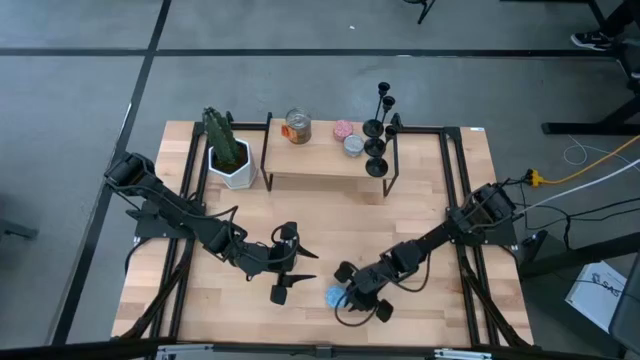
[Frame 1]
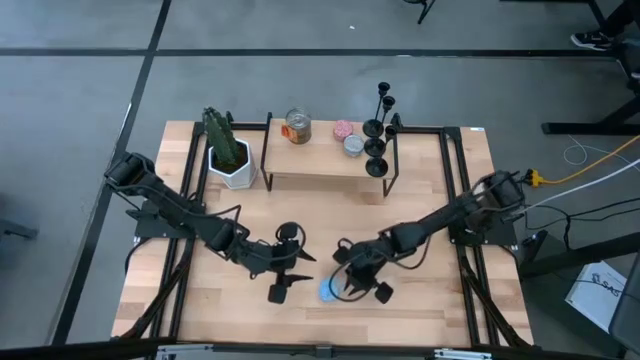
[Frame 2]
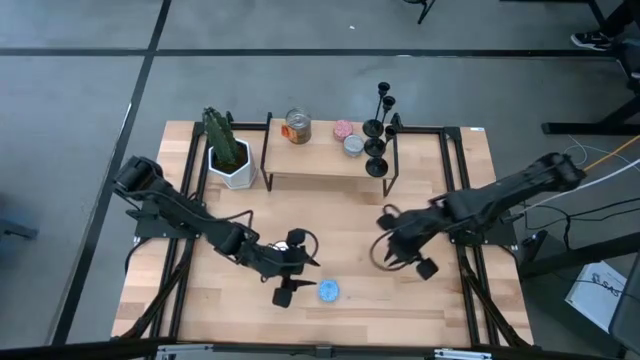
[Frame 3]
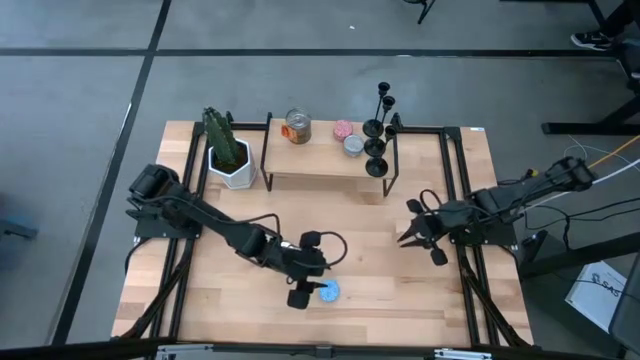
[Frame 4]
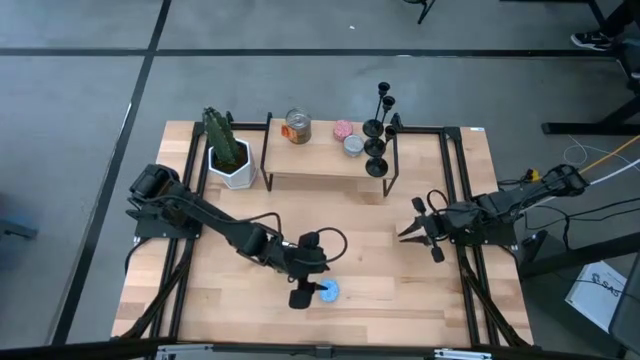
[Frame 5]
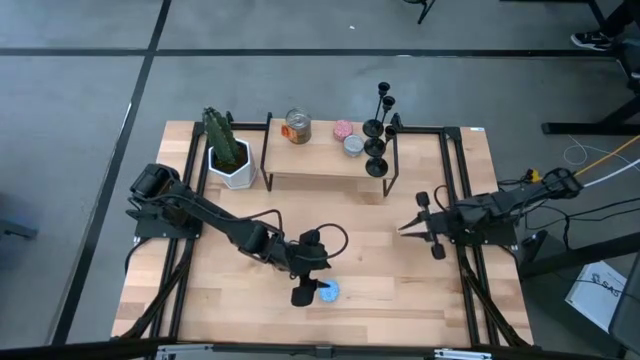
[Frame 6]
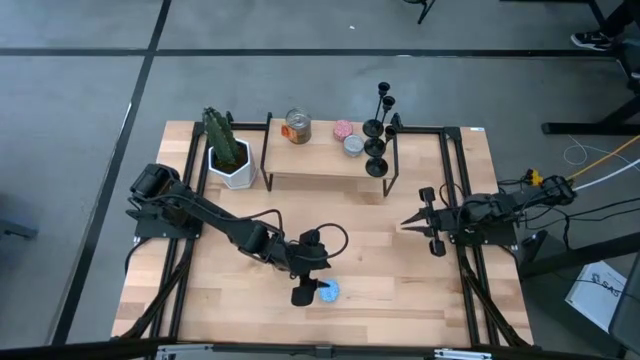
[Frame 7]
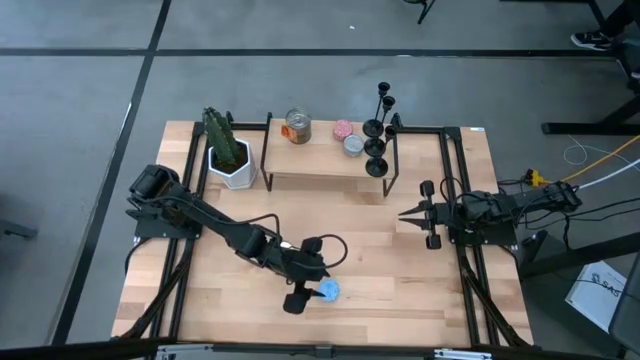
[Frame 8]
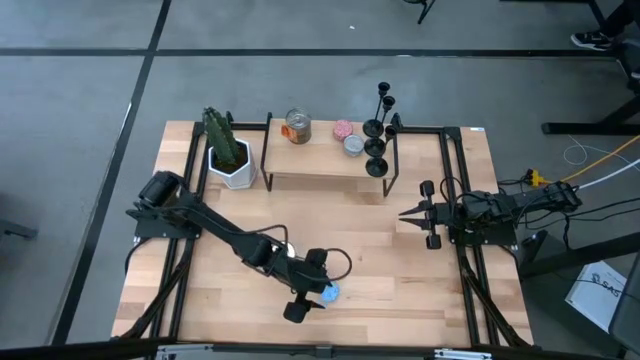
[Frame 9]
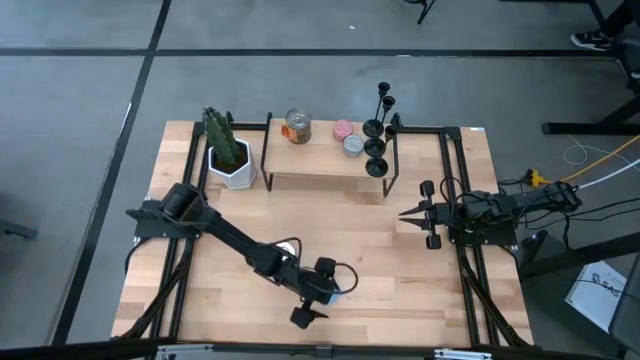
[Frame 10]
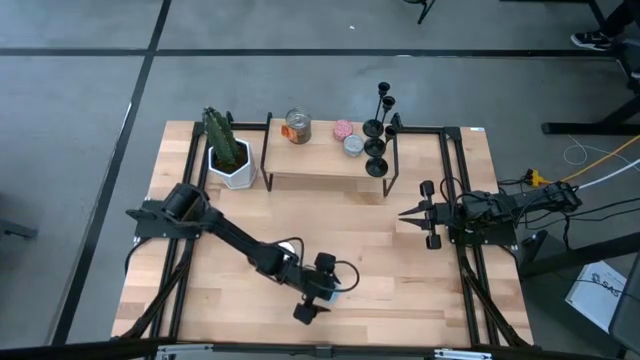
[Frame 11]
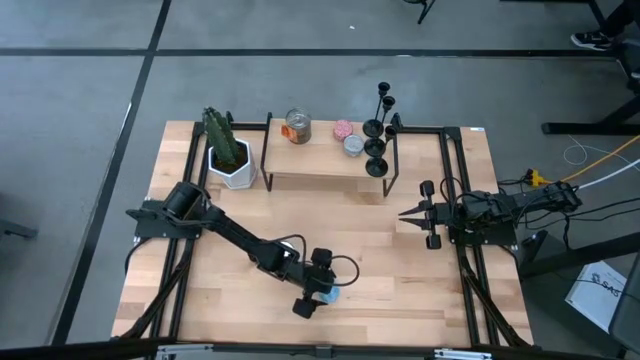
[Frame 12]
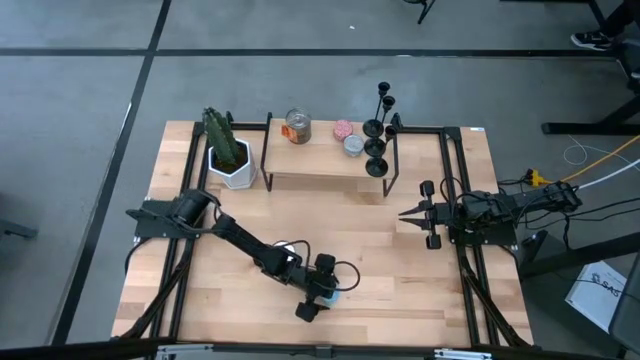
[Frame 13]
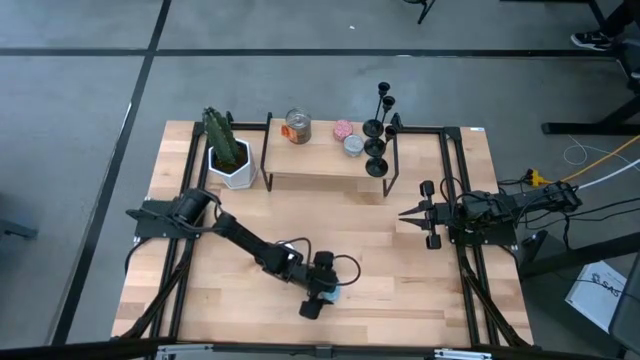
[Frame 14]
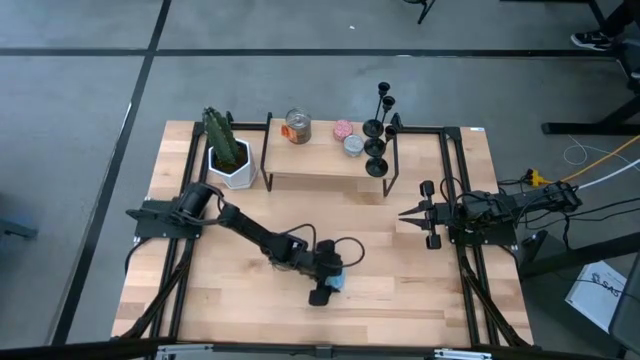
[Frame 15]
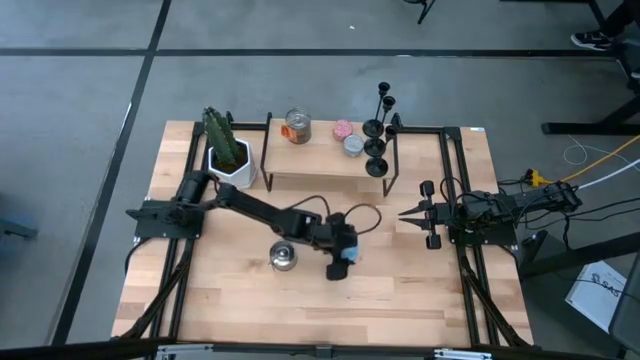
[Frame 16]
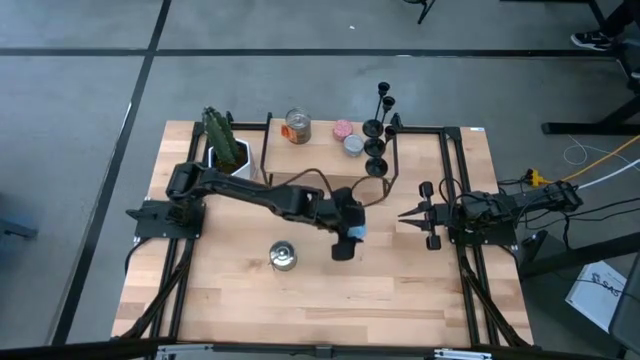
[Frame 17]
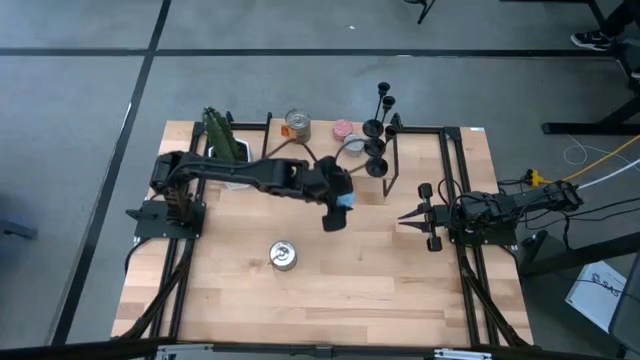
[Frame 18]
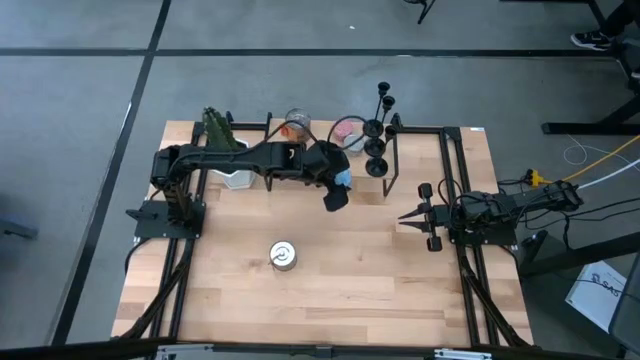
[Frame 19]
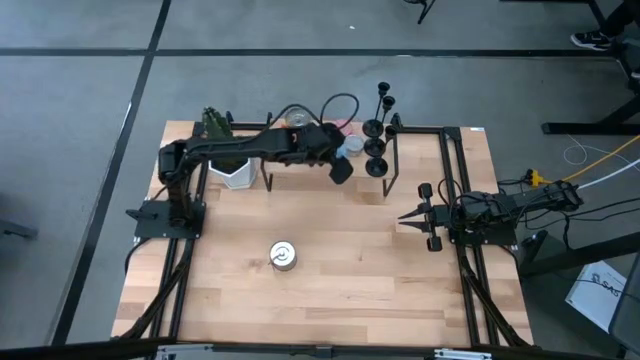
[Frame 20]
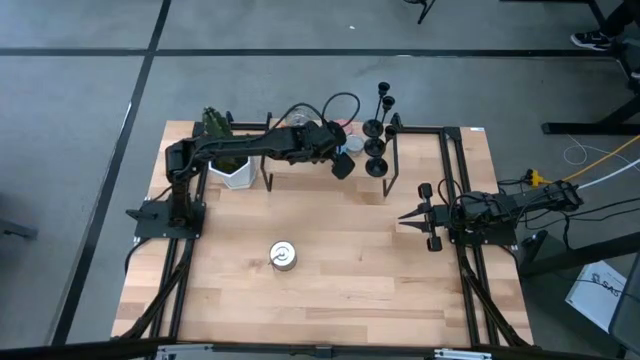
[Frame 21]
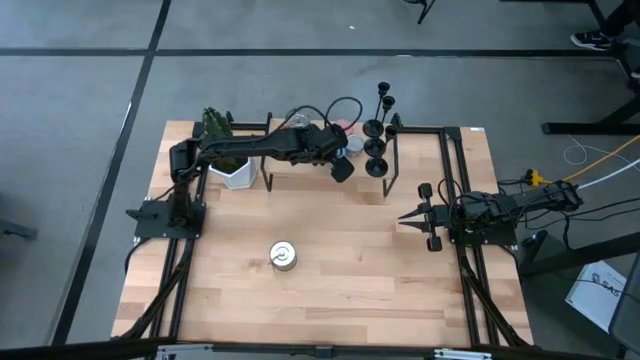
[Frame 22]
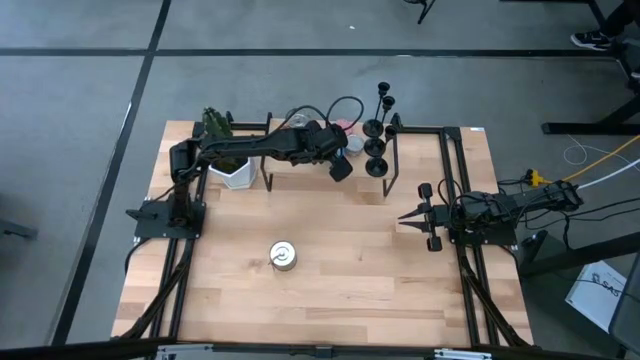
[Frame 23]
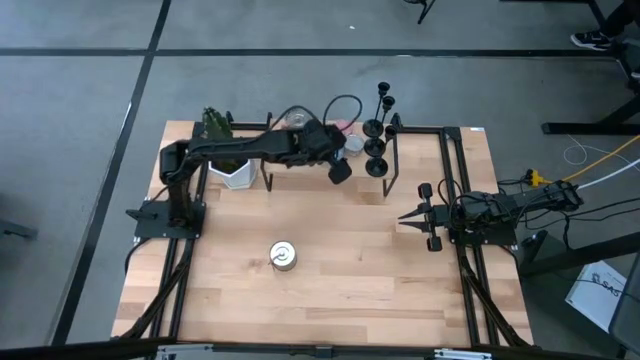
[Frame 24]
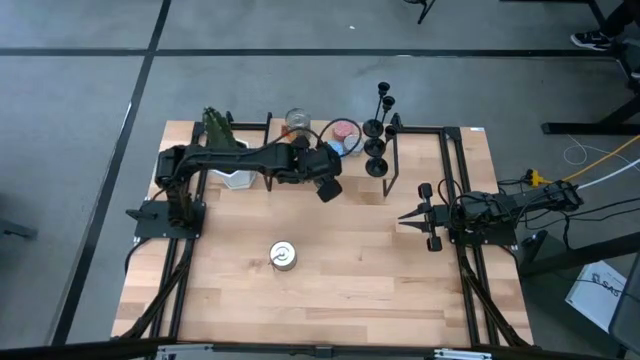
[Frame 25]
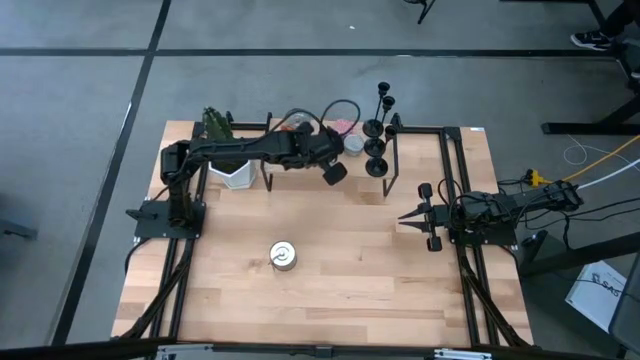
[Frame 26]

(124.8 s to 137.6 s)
Task: Pick & Place candle stick holders
Put the blue scented candle on the shelf

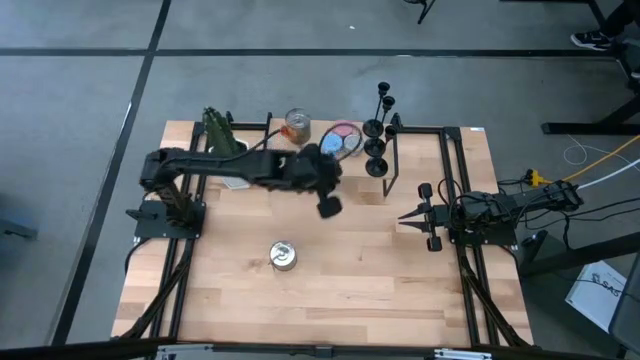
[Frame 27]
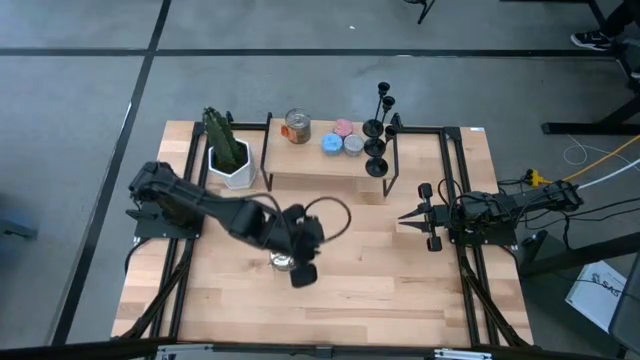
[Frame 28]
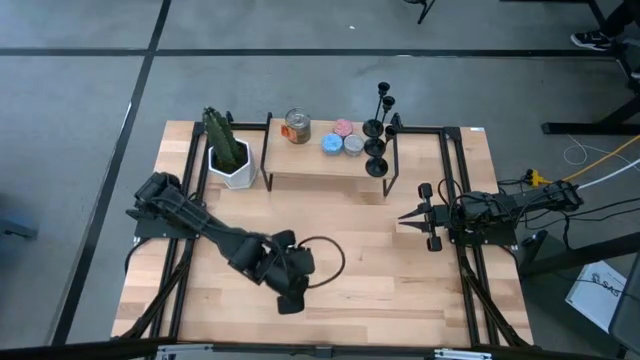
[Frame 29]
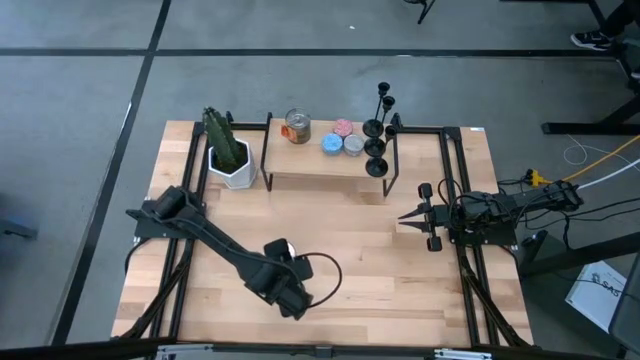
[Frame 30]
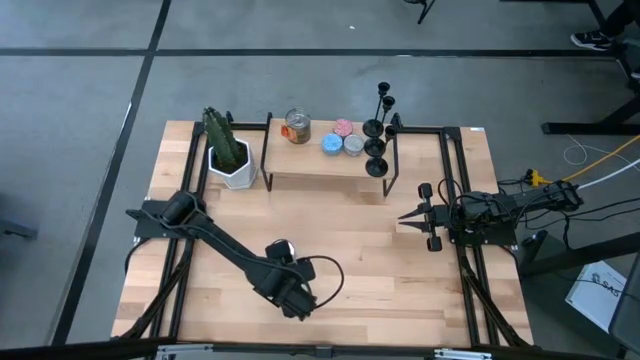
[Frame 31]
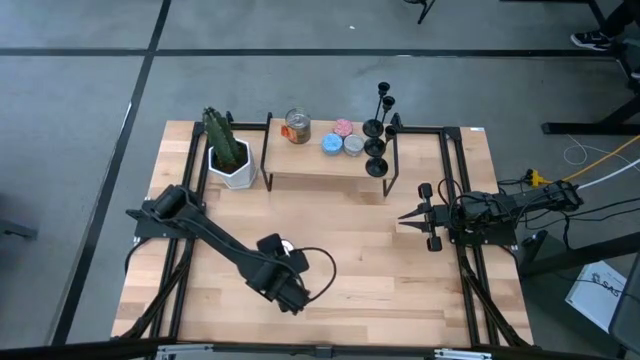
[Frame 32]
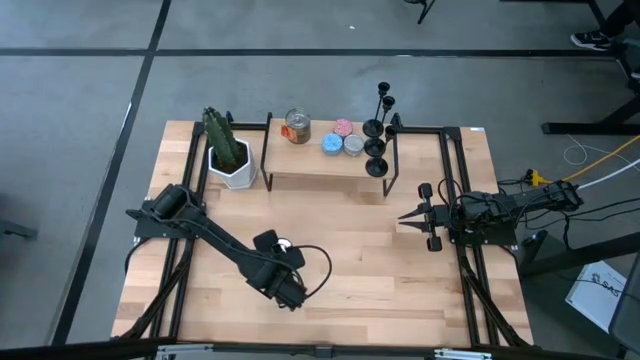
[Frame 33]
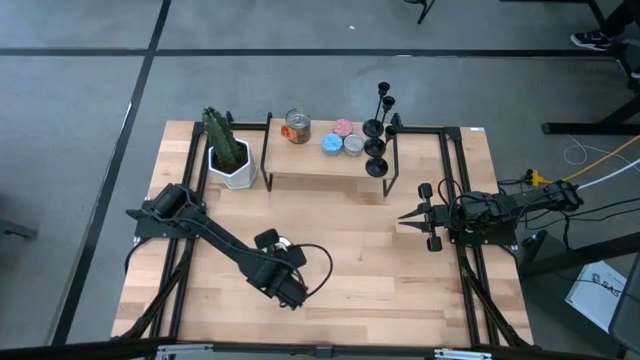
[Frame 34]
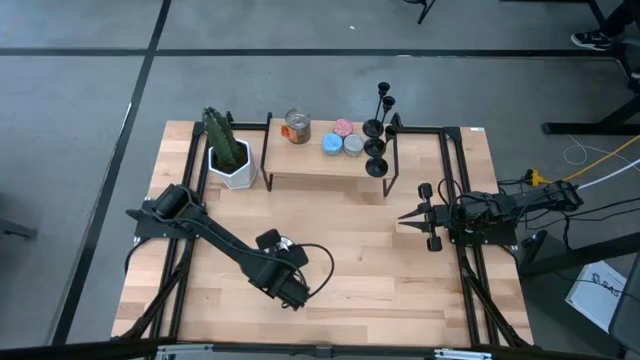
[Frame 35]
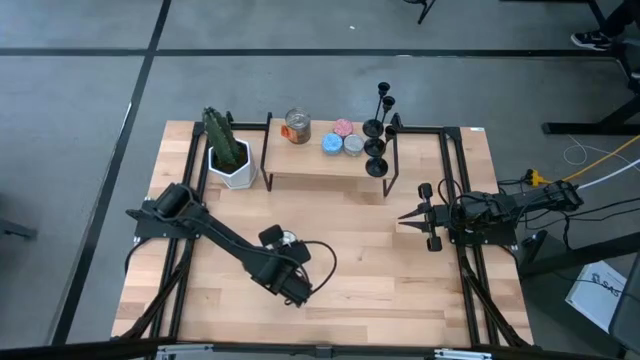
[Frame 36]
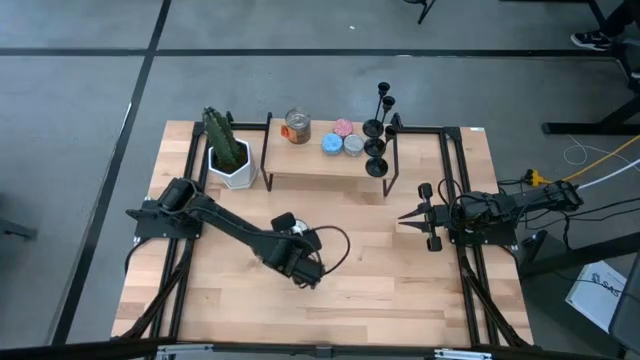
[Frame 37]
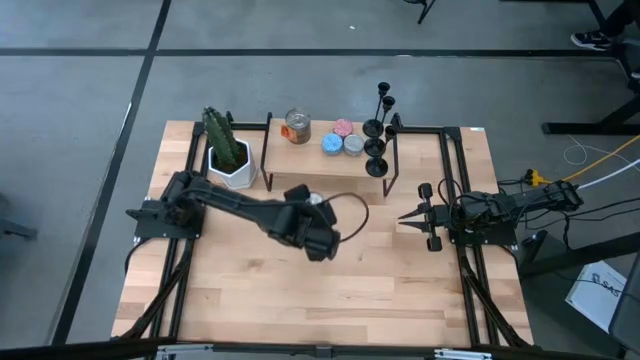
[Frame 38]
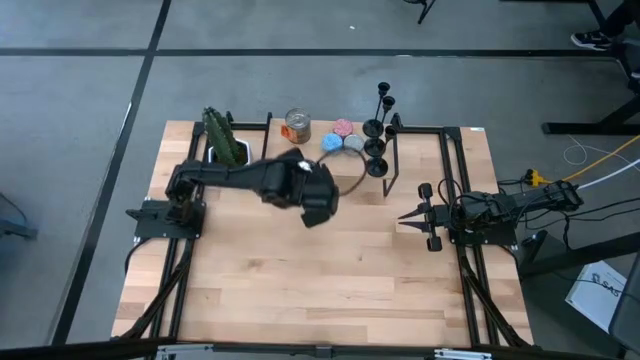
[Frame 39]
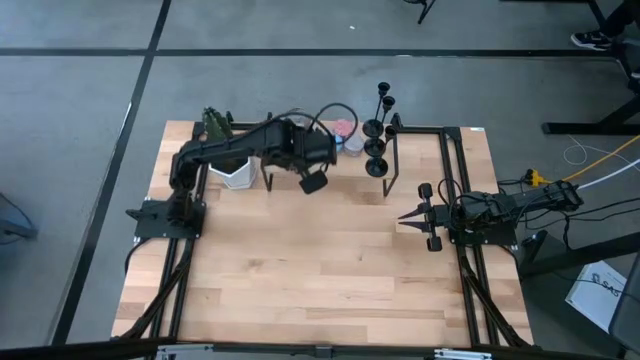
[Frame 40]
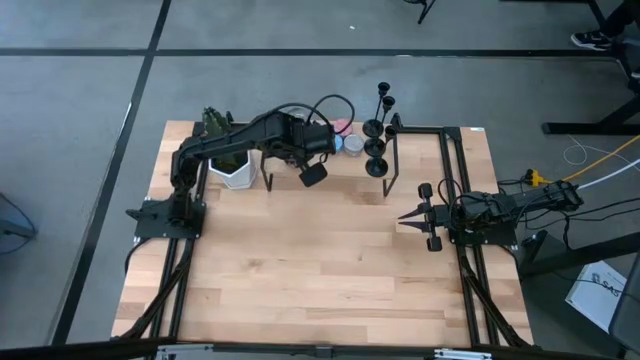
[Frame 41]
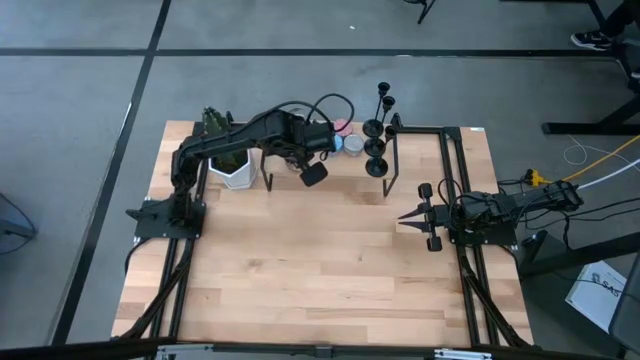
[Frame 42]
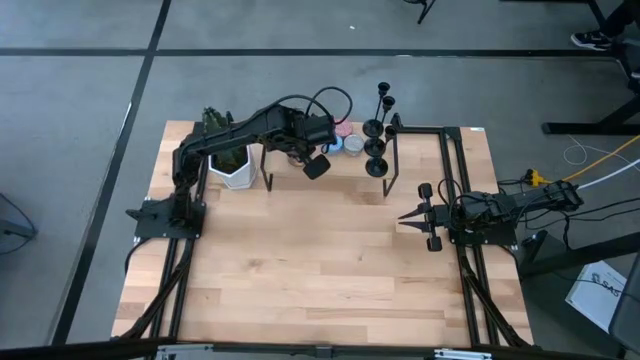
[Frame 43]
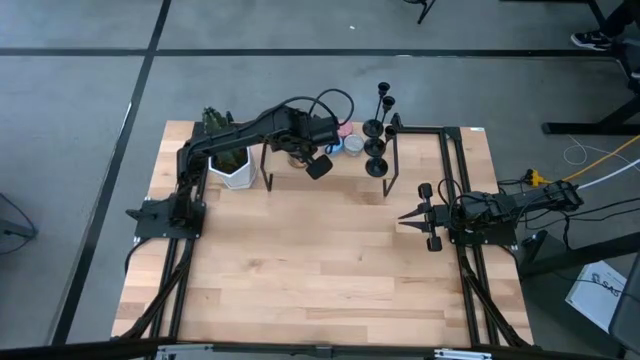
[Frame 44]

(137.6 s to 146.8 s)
Align the silver scented candle with the other silver scented candle on the shelf
